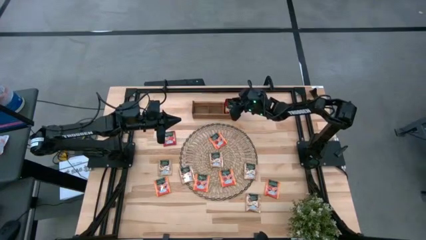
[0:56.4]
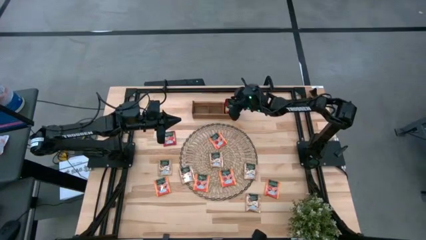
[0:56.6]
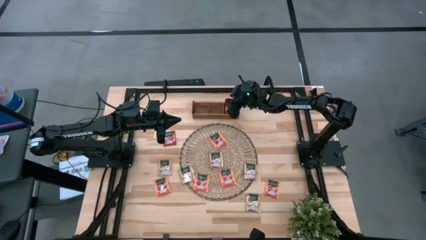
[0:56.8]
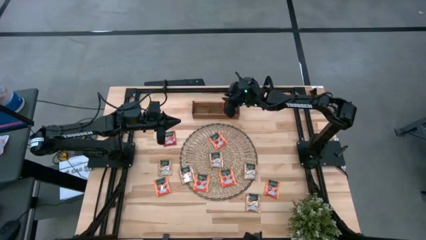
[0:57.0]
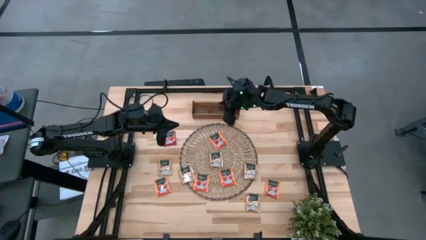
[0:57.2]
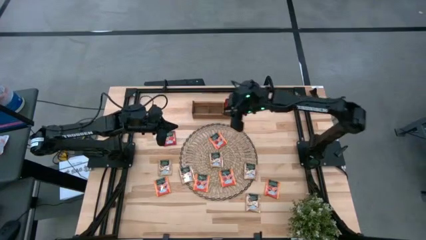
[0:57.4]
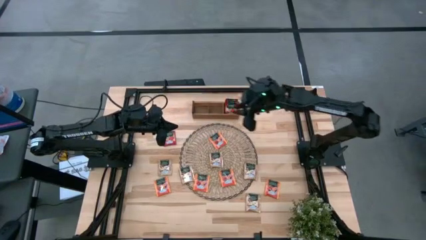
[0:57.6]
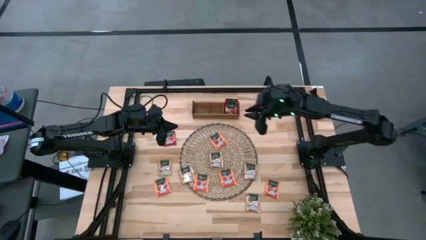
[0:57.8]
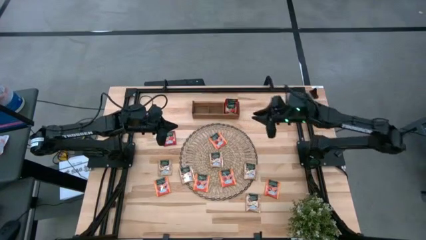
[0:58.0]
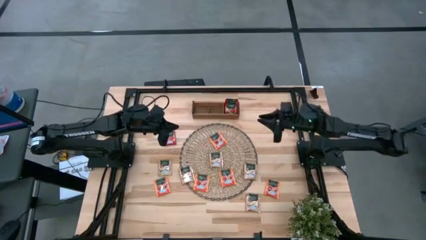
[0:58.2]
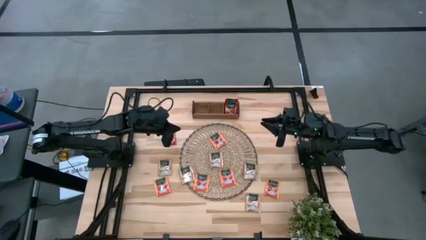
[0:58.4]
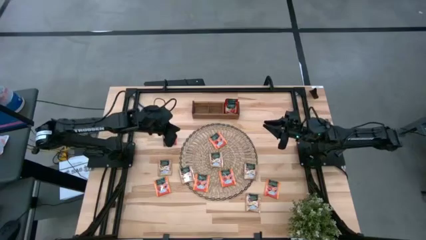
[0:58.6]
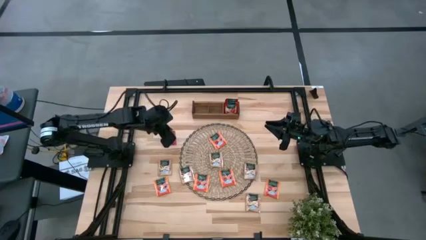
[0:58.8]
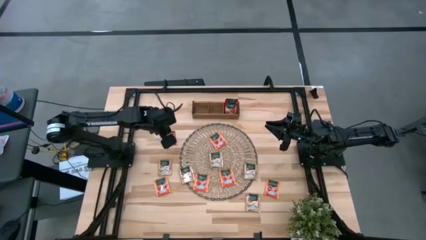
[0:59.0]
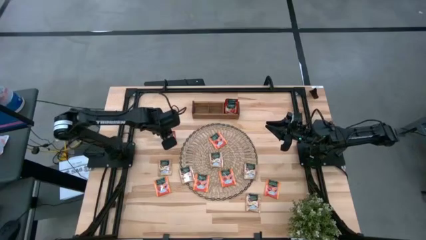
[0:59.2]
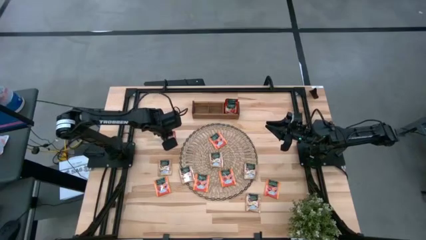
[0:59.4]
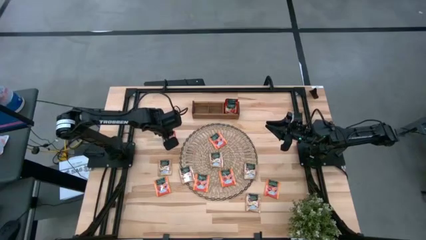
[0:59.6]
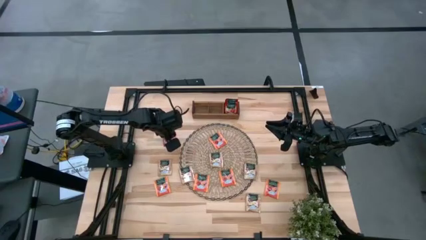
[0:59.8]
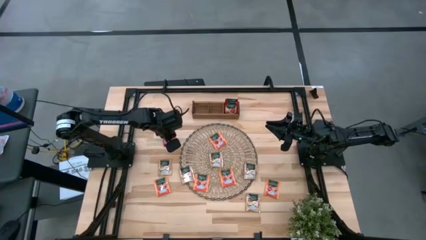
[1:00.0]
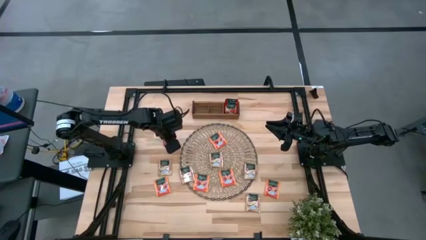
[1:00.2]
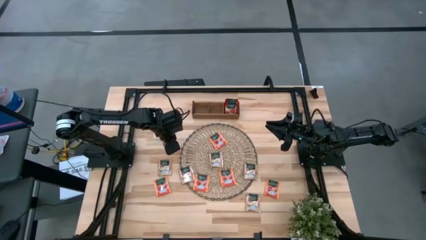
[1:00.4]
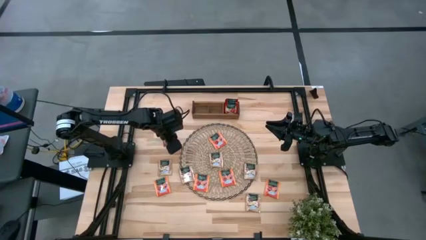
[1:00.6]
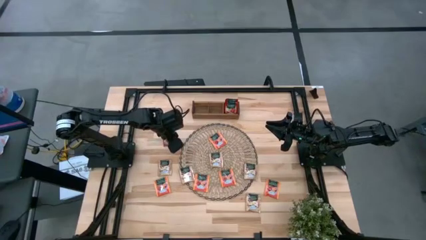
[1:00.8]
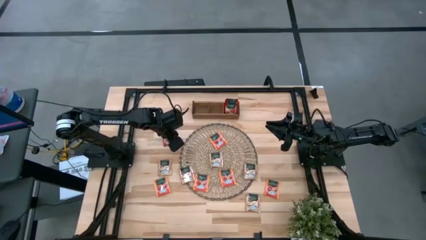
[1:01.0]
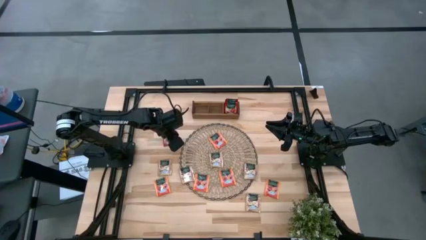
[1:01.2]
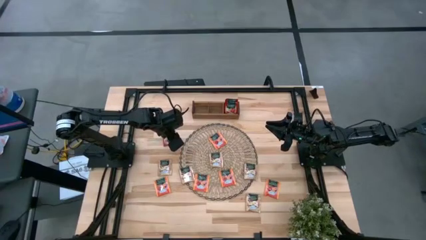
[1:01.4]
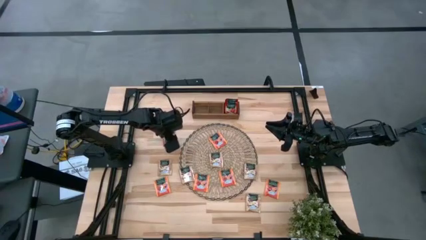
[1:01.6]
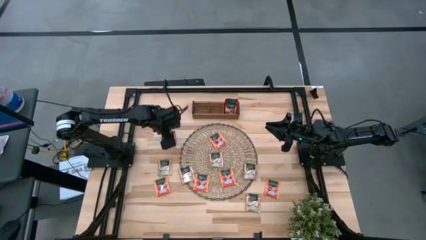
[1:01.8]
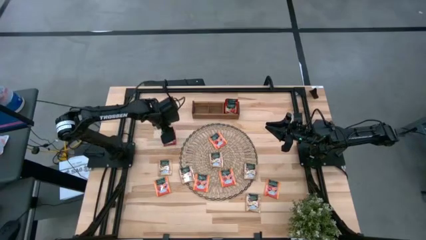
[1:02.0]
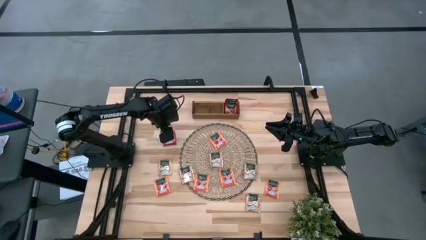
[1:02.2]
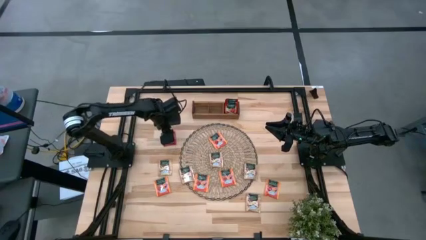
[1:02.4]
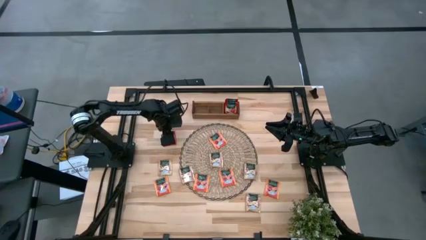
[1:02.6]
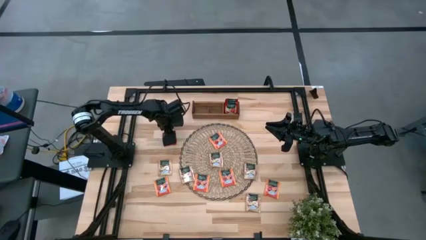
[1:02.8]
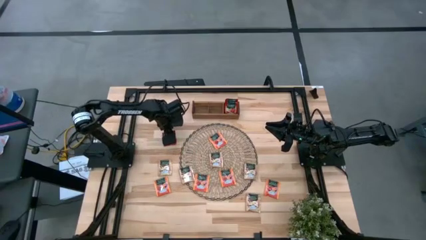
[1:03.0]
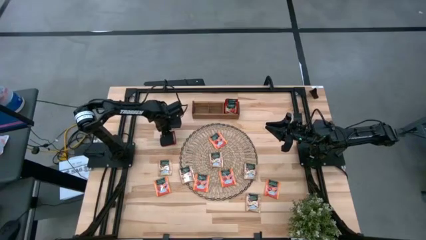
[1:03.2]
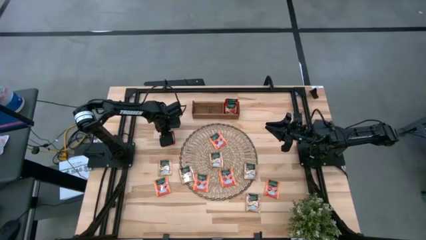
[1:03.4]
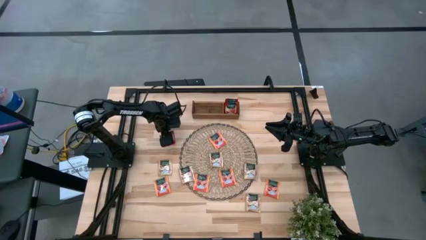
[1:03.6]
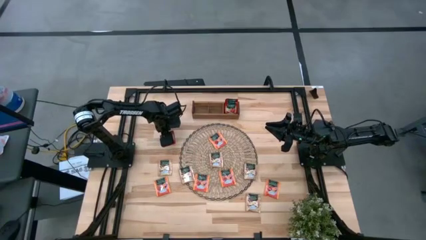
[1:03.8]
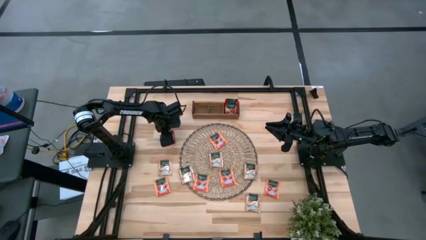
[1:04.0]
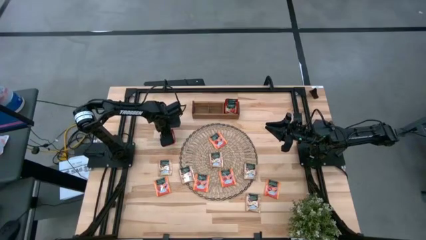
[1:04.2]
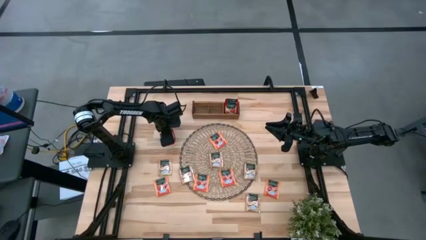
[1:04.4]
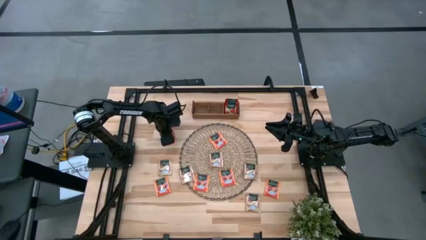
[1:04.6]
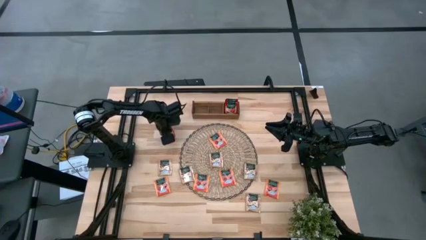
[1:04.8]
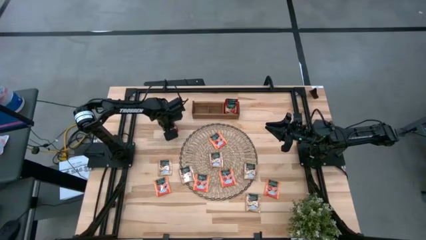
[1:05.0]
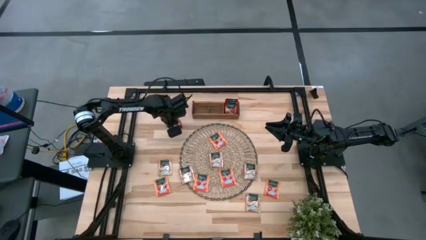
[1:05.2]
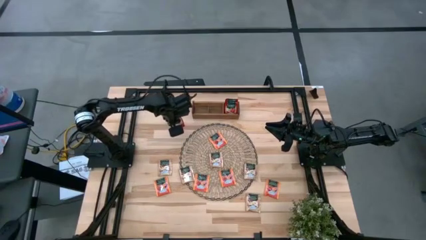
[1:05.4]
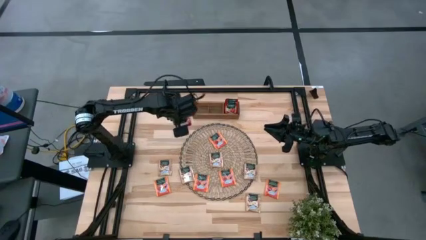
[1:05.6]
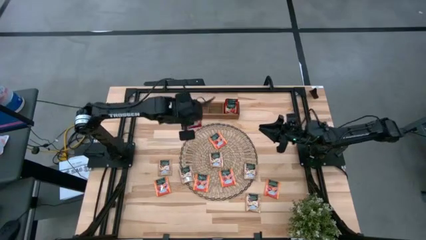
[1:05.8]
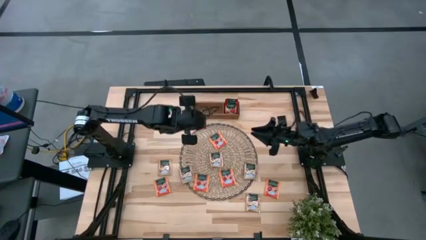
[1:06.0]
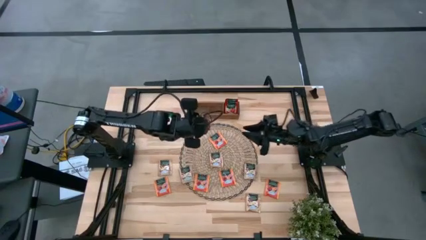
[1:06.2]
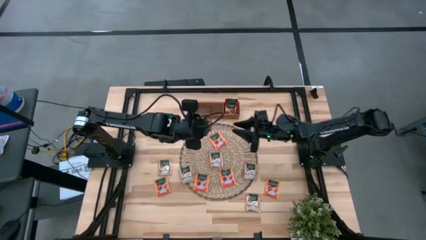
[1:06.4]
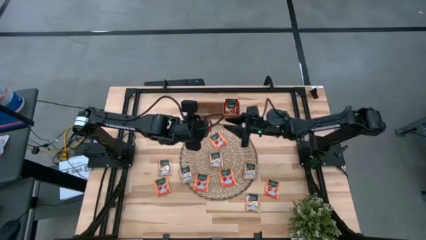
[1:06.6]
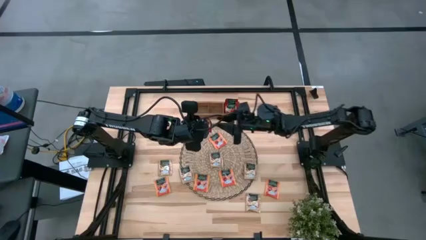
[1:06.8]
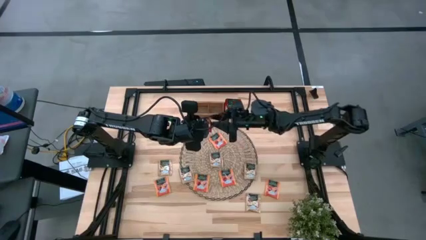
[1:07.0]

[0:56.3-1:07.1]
Task: Pick & Place Tea
Put the red tea bag into the right section of the wooden organizer
